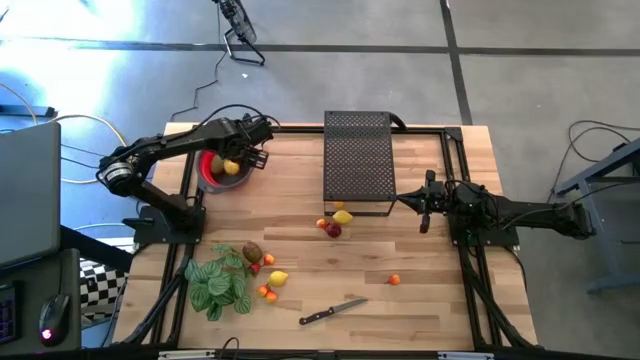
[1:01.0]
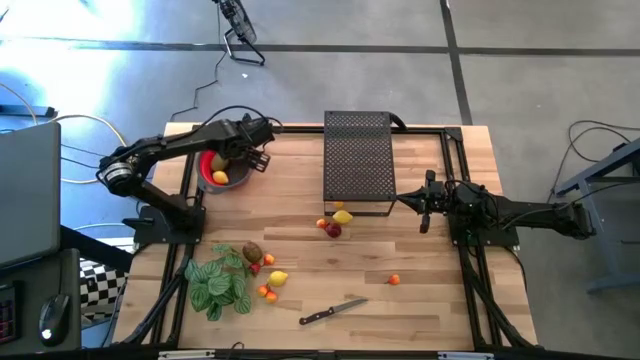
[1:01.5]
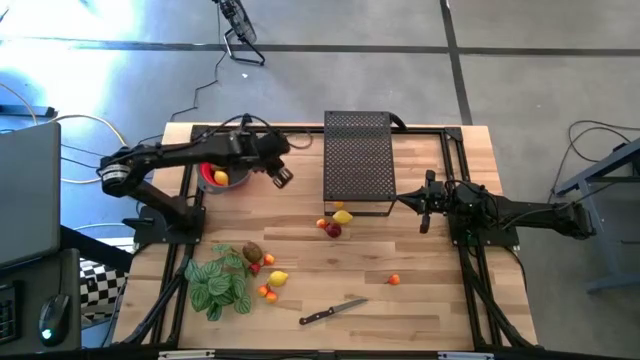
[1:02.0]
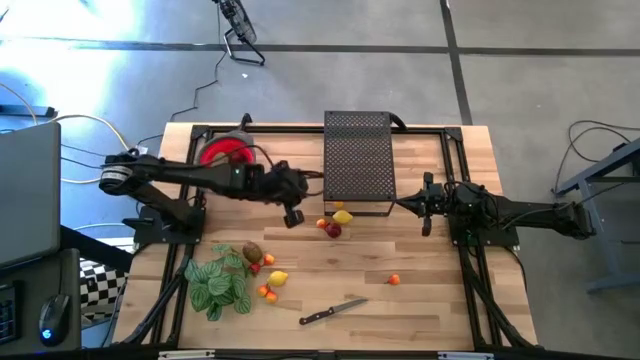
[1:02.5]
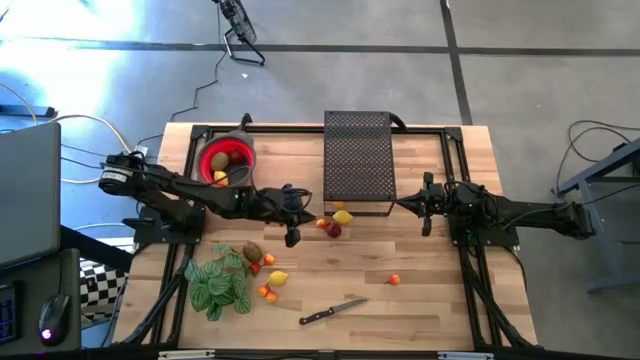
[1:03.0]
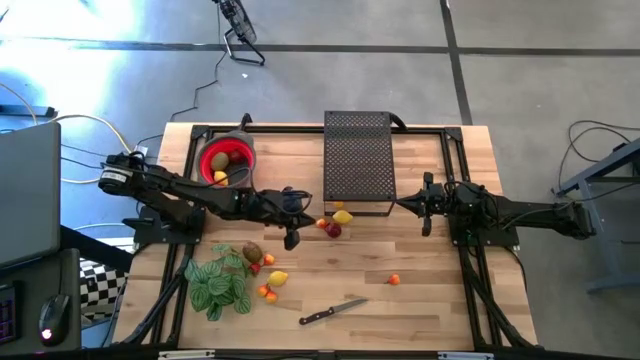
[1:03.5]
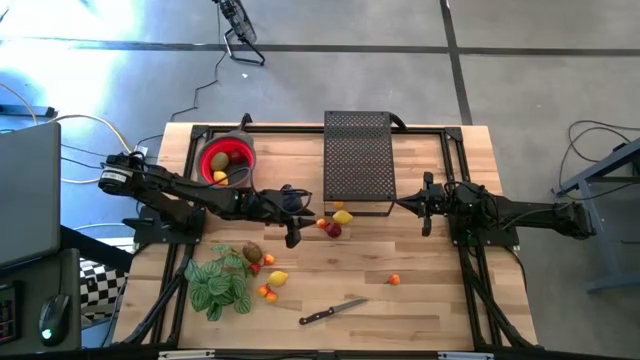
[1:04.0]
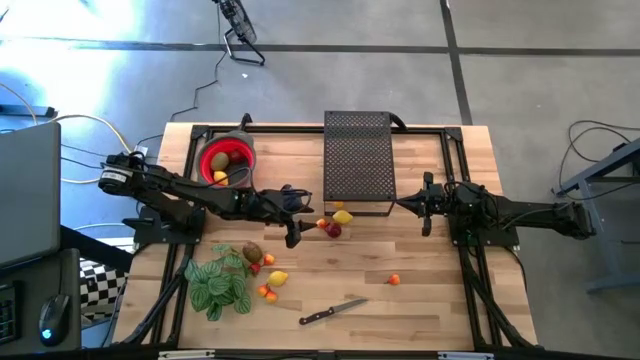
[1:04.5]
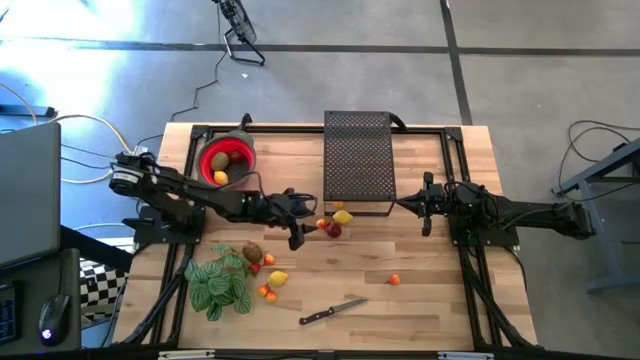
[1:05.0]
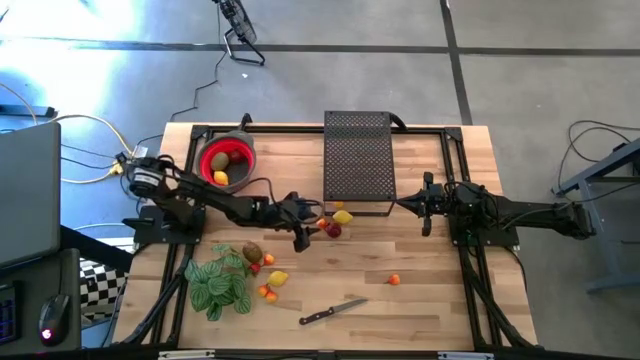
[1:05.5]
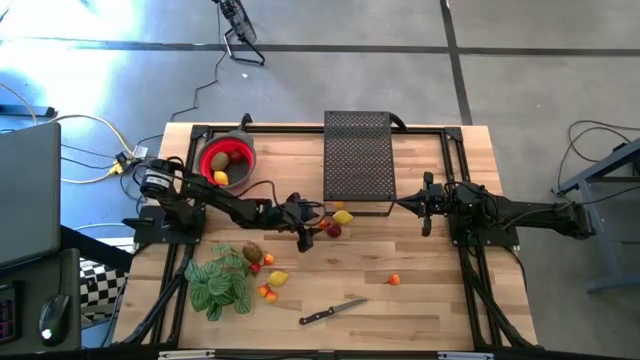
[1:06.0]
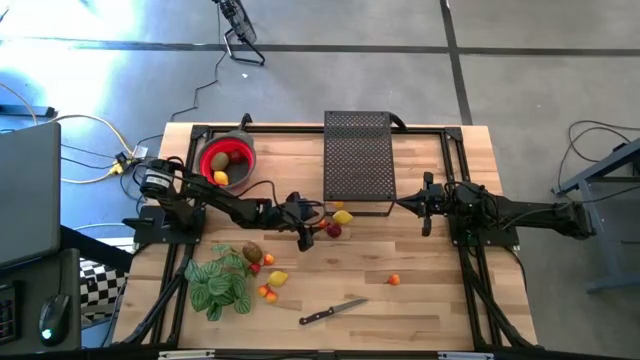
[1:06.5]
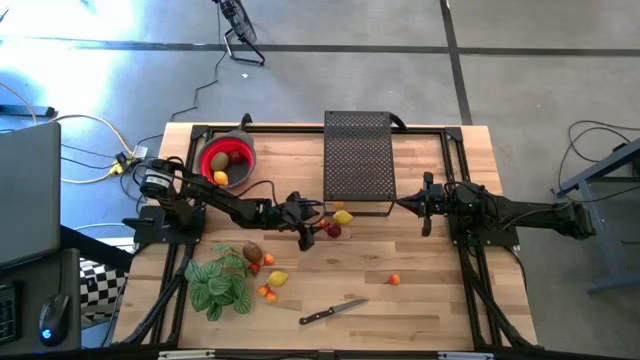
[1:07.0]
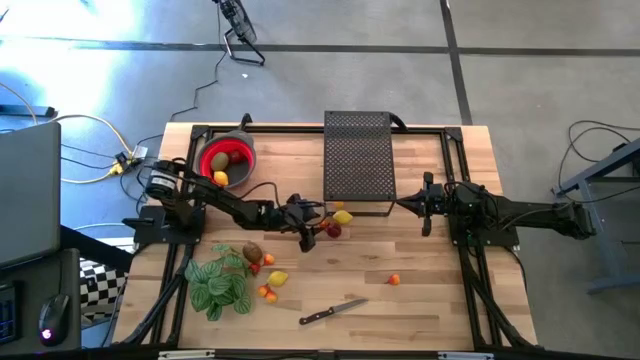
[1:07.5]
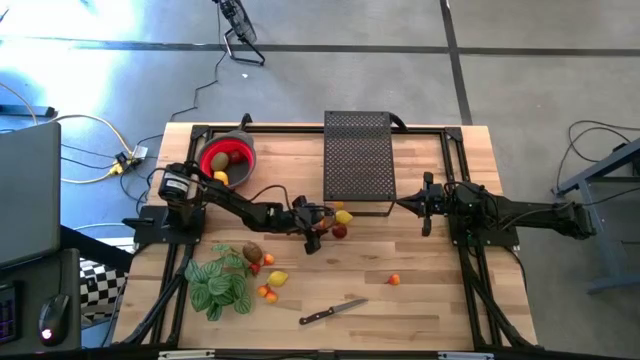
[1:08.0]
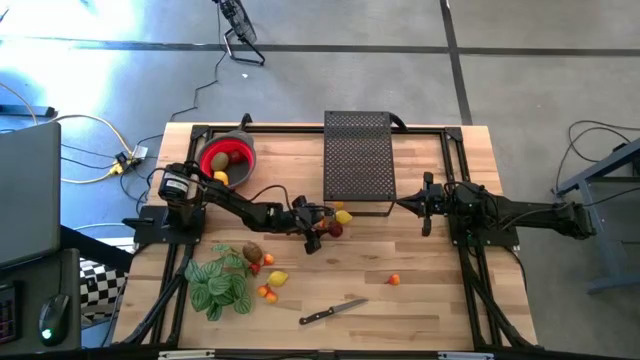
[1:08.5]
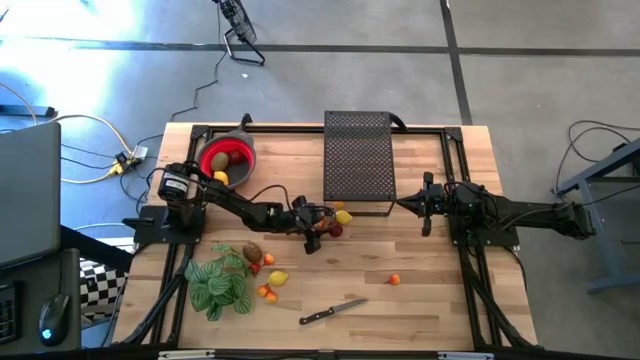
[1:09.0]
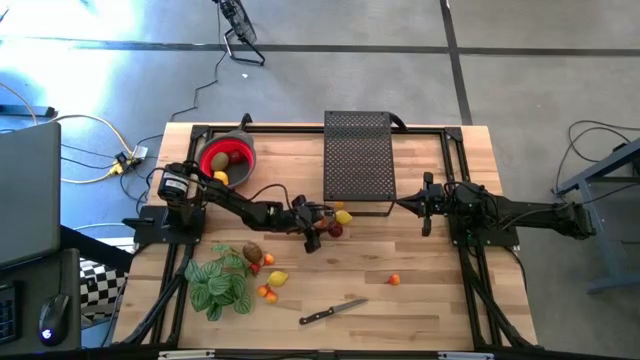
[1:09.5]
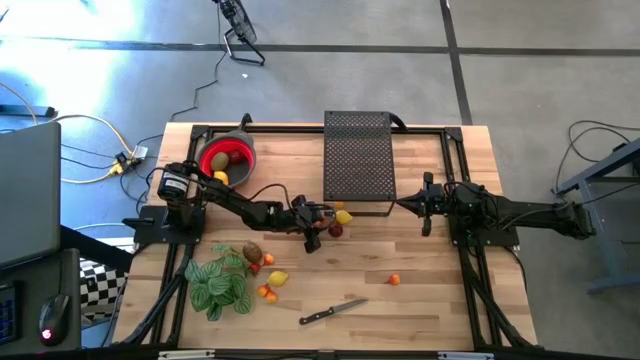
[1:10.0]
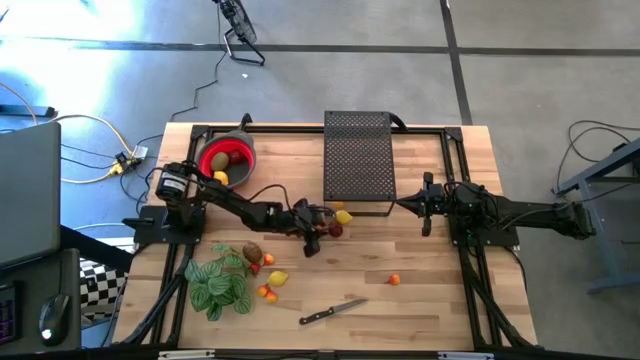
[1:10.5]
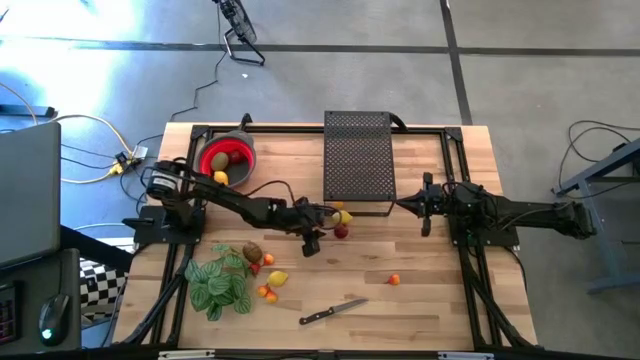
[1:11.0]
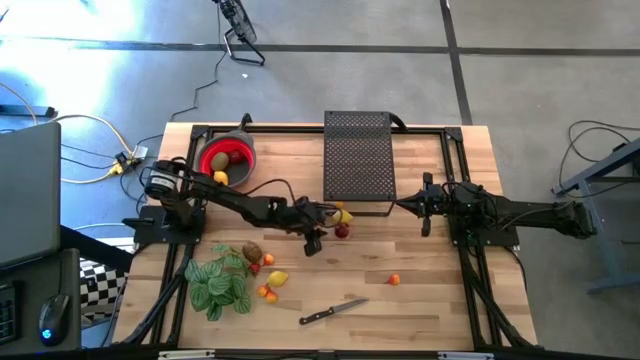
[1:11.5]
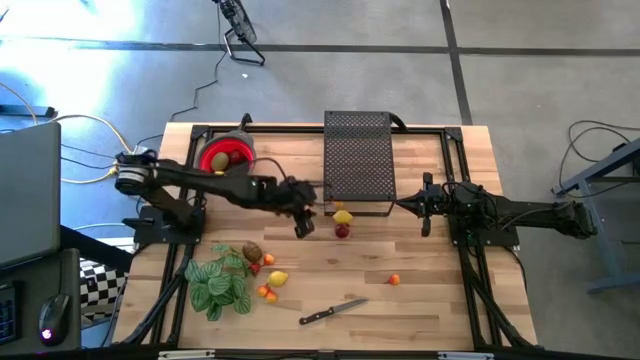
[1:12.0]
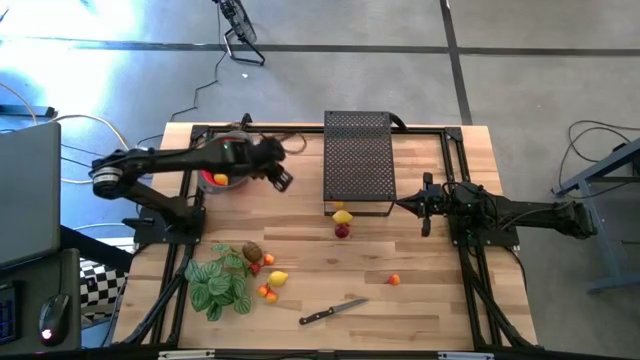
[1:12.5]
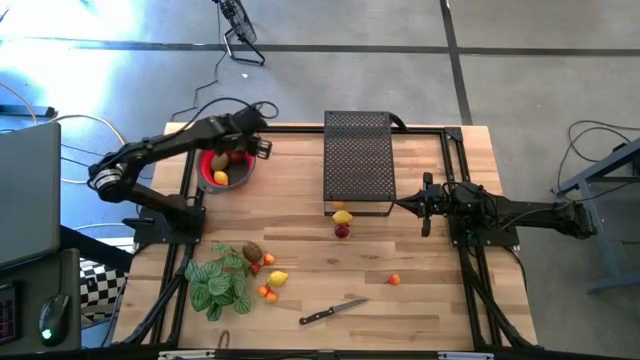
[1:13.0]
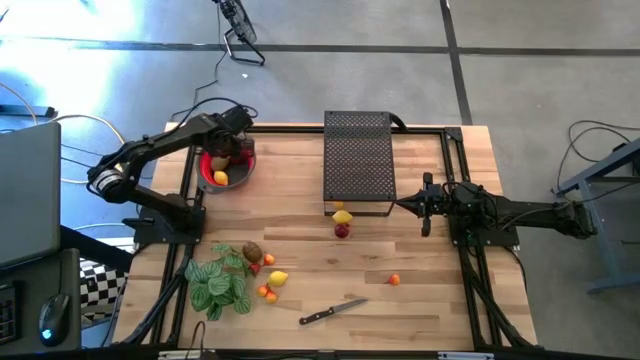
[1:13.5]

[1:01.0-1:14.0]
Task: Pick & Place Fruit
Put the orange pear into the strainer bowl

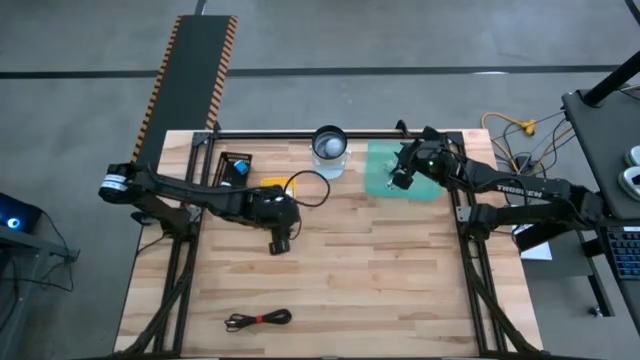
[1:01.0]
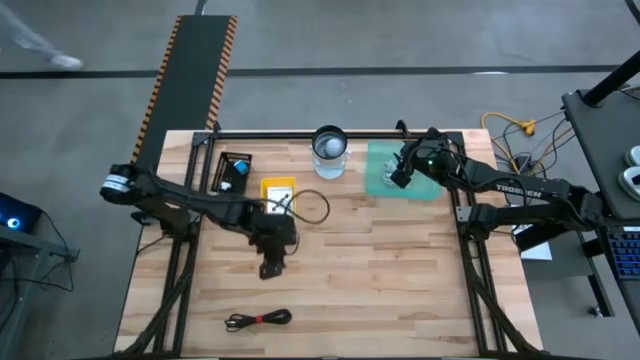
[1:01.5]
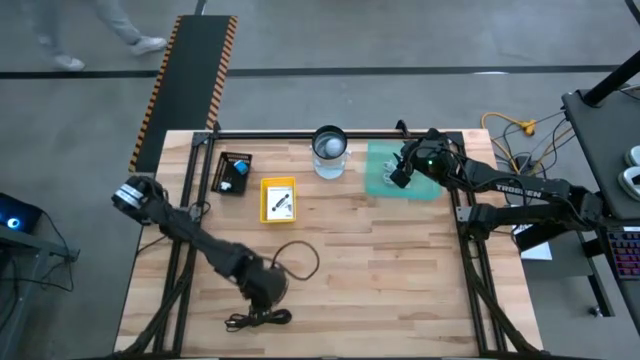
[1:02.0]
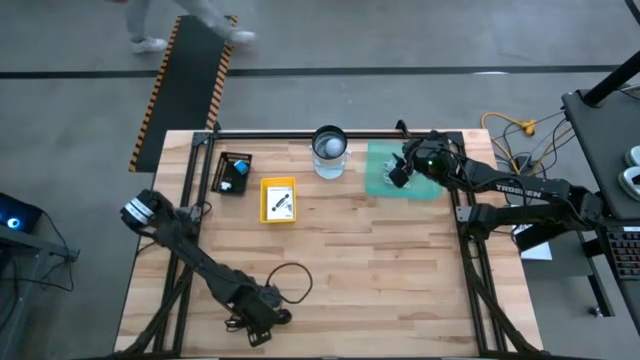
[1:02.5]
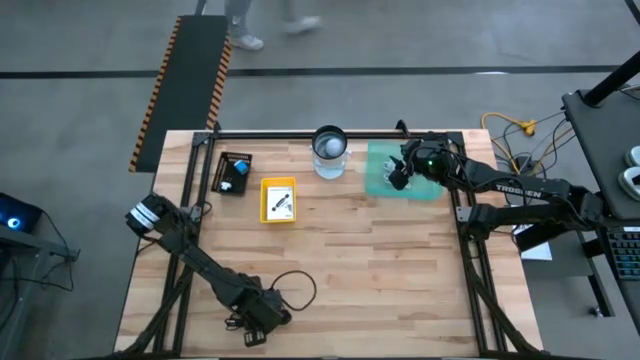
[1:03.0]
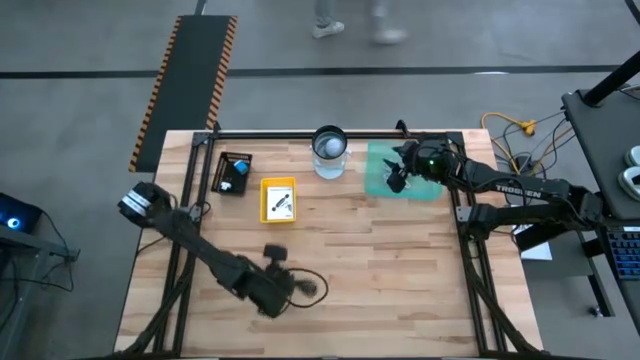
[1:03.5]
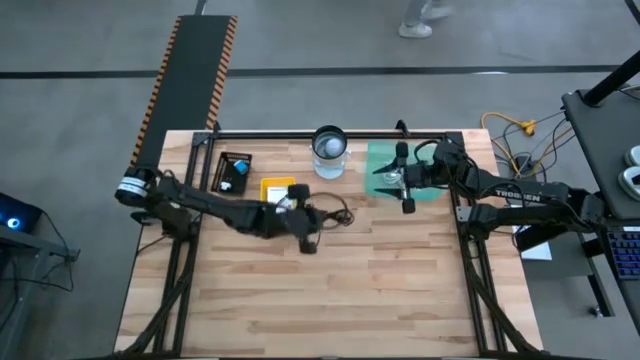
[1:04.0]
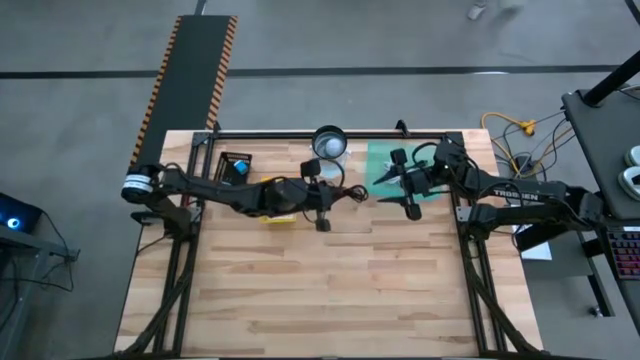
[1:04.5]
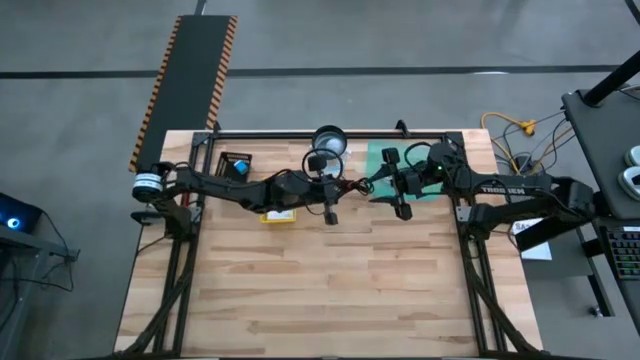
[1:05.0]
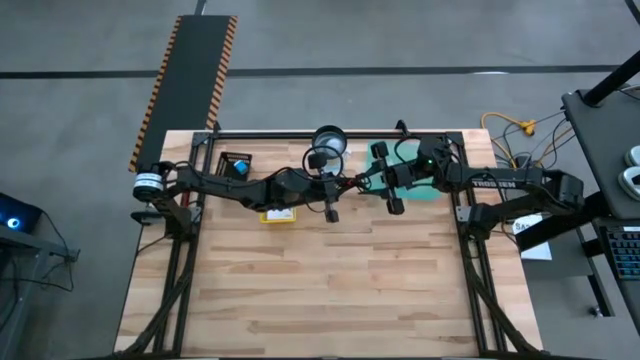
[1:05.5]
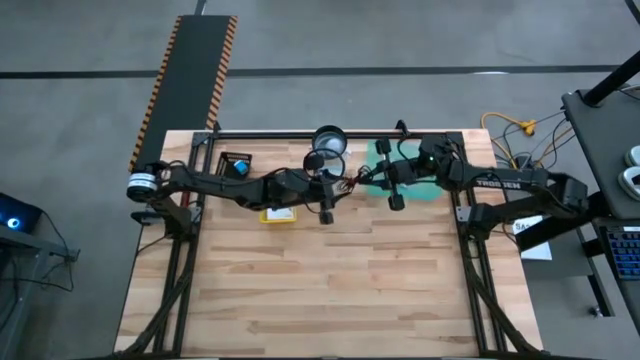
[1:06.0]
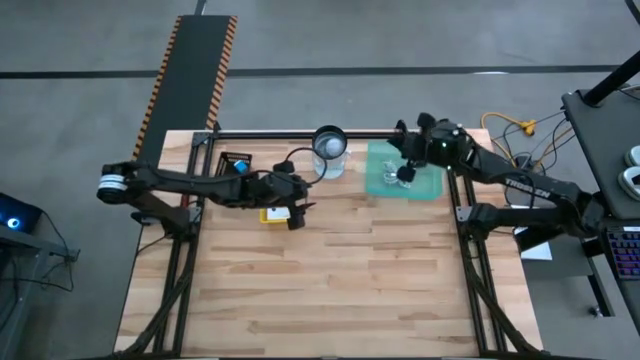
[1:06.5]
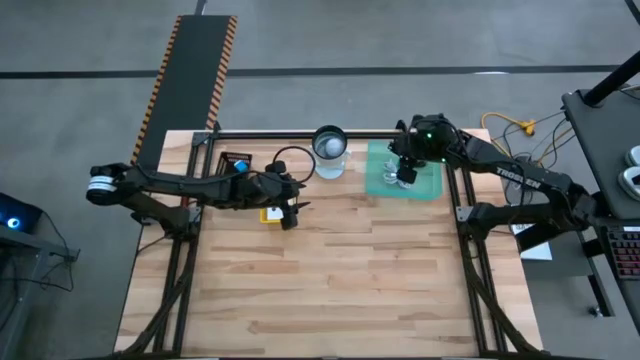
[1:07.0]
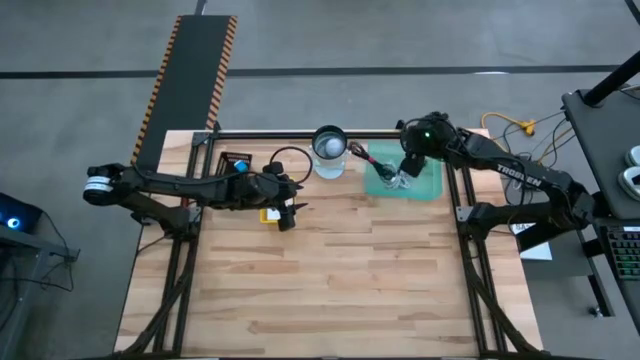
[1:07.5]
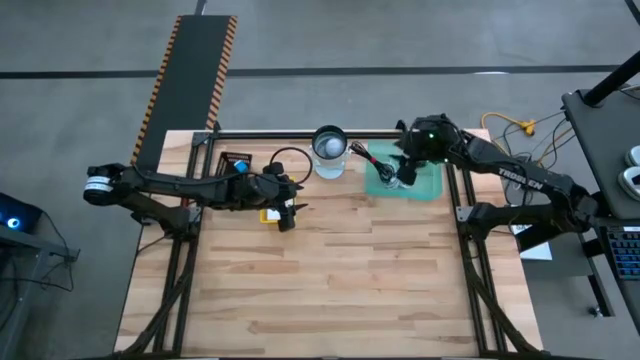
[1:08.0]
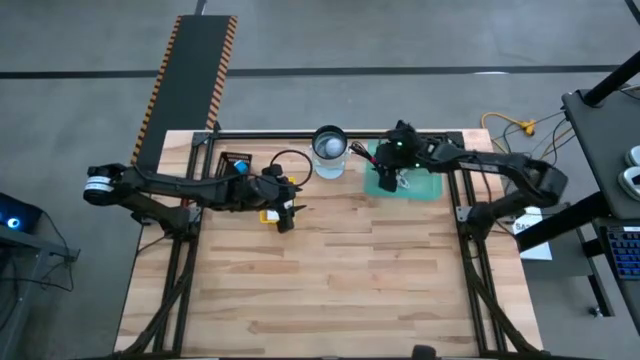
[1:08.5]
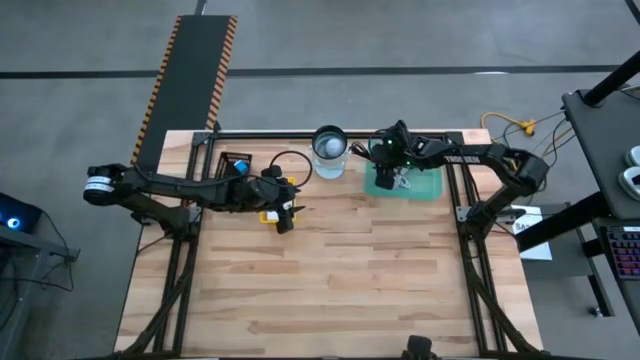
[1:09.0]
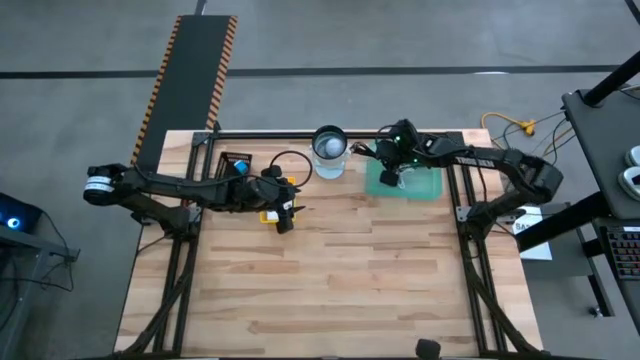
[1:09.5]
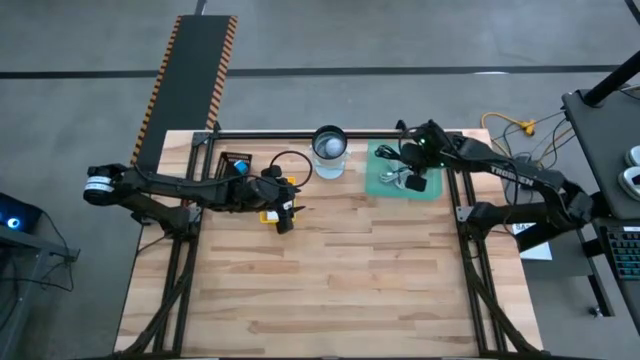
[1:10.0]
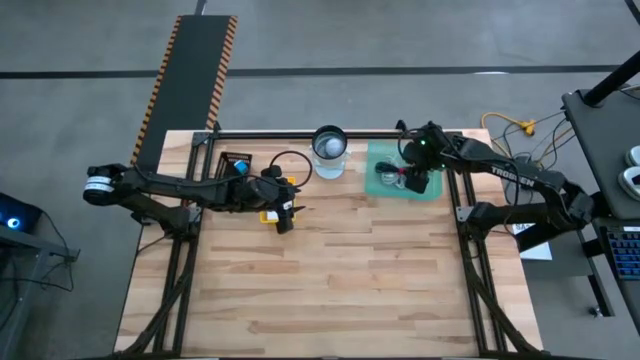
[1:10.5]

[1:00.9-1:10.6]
Task: Pick and place items into bin
Put the black cable charger into the light blue bin
